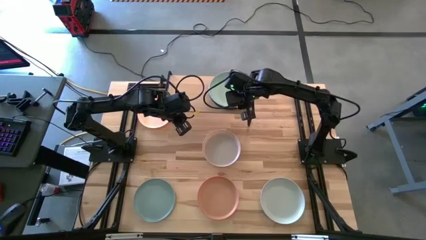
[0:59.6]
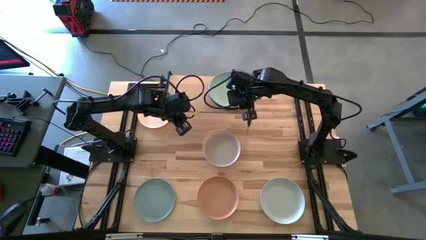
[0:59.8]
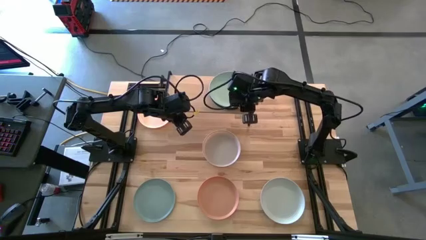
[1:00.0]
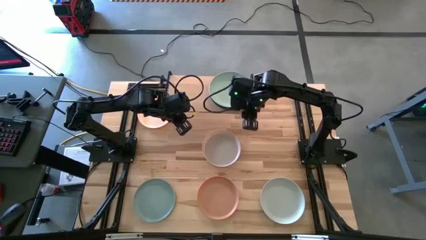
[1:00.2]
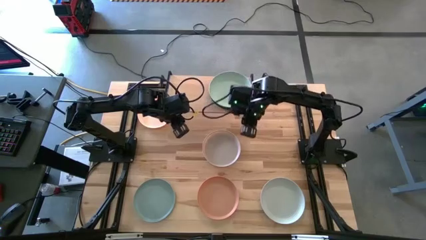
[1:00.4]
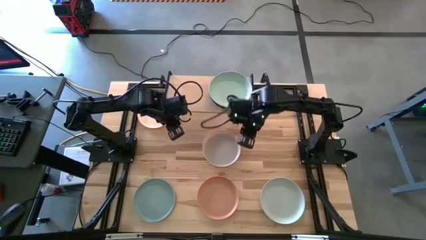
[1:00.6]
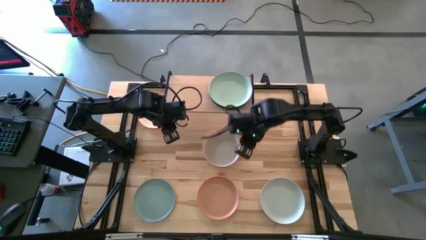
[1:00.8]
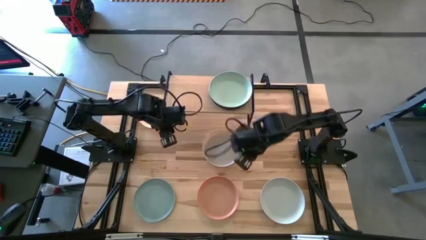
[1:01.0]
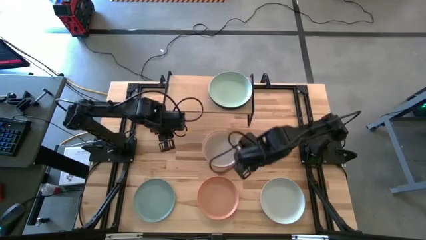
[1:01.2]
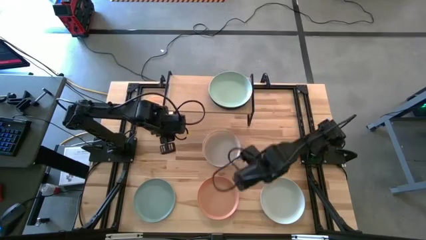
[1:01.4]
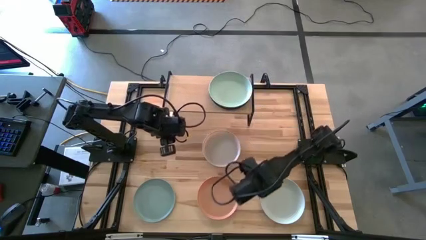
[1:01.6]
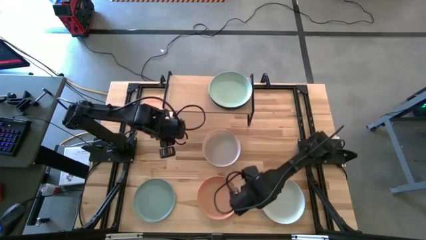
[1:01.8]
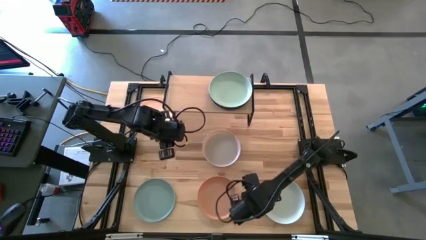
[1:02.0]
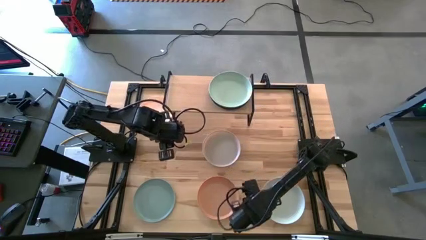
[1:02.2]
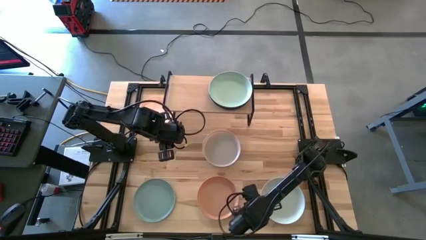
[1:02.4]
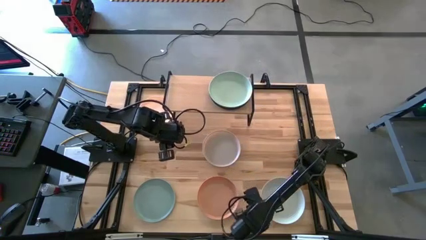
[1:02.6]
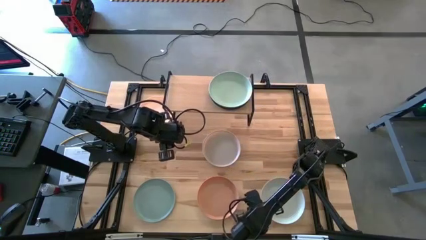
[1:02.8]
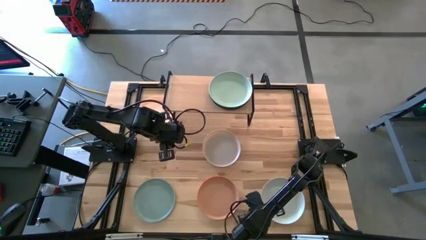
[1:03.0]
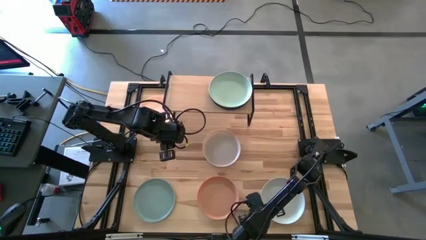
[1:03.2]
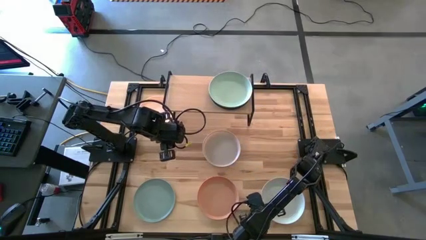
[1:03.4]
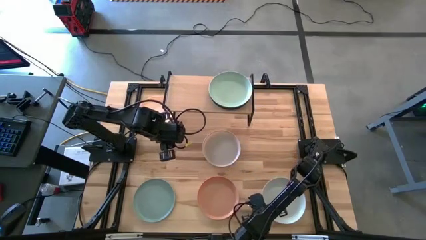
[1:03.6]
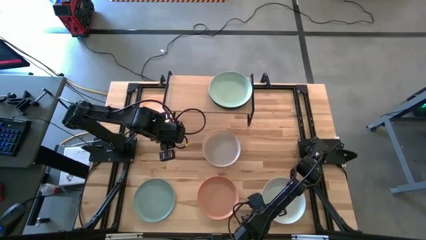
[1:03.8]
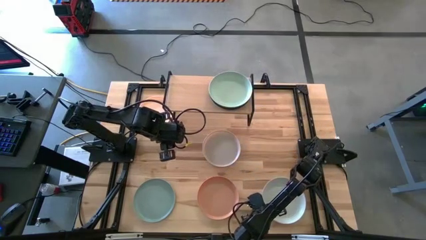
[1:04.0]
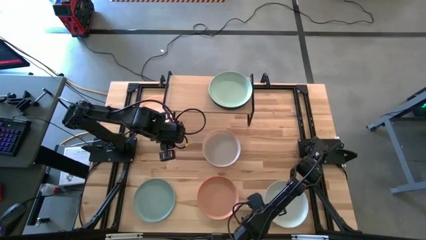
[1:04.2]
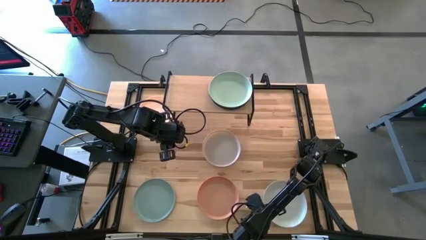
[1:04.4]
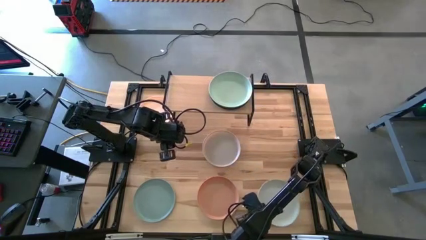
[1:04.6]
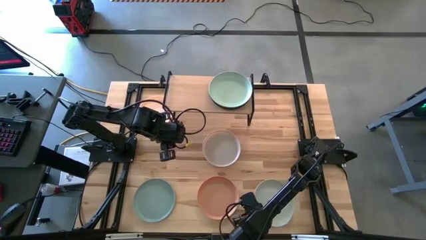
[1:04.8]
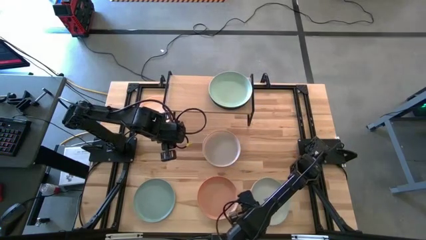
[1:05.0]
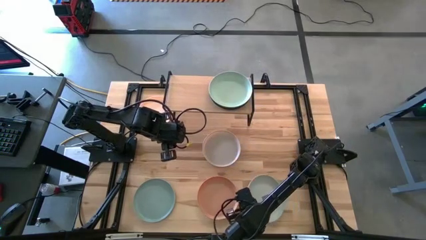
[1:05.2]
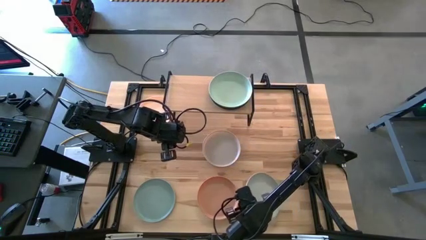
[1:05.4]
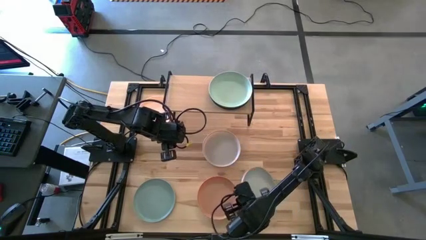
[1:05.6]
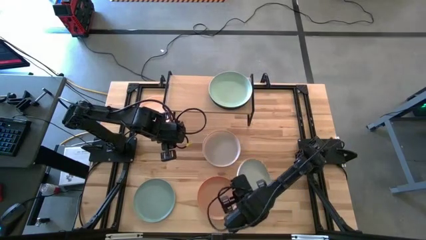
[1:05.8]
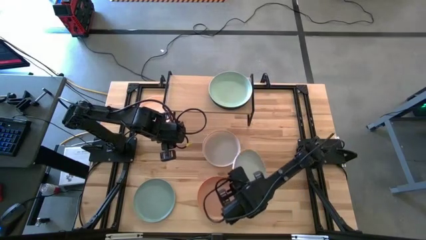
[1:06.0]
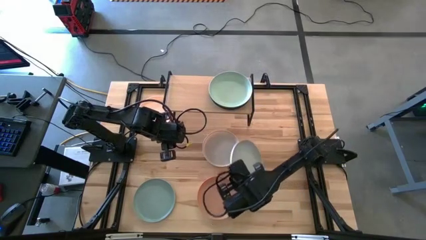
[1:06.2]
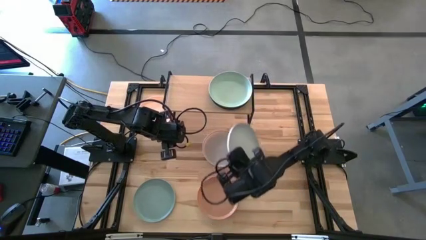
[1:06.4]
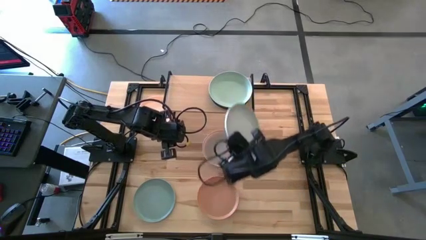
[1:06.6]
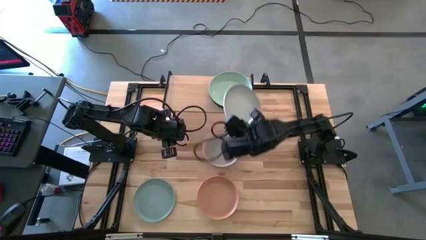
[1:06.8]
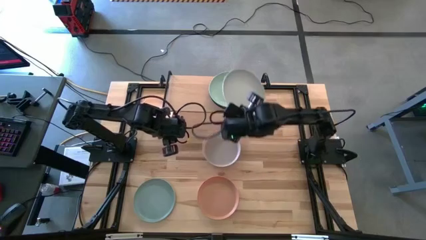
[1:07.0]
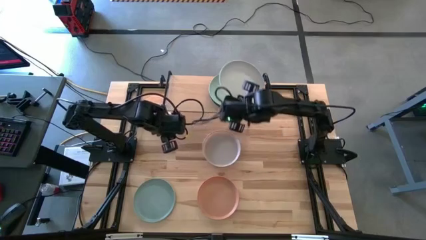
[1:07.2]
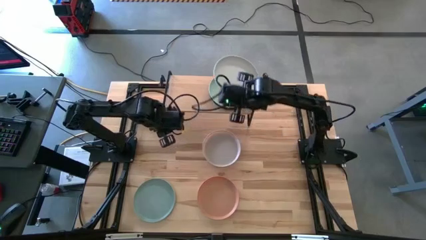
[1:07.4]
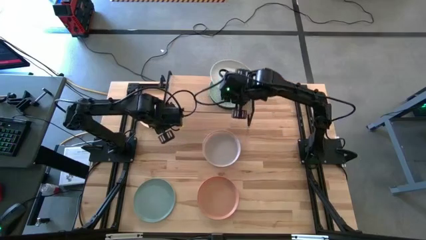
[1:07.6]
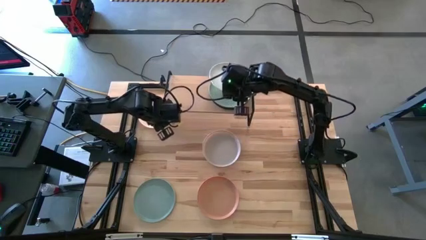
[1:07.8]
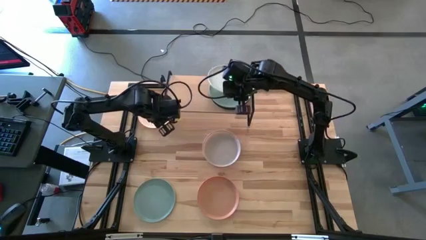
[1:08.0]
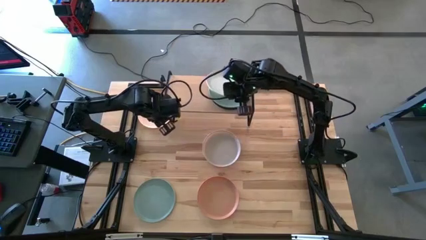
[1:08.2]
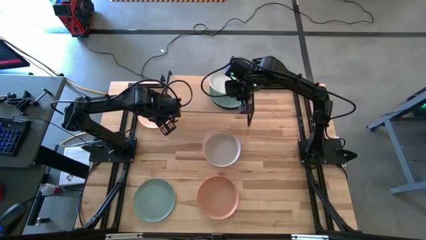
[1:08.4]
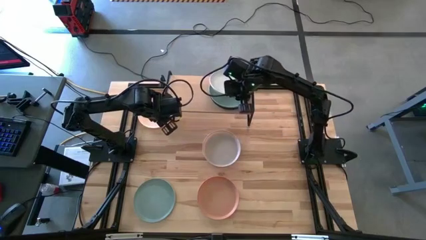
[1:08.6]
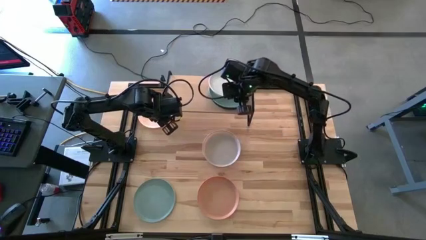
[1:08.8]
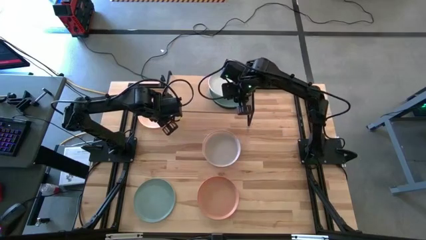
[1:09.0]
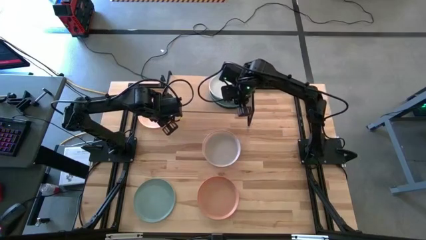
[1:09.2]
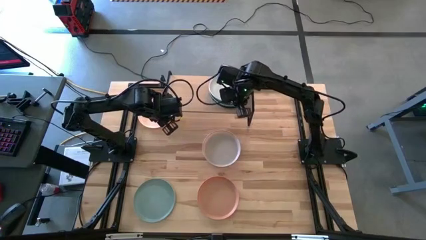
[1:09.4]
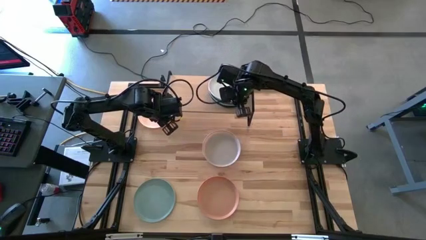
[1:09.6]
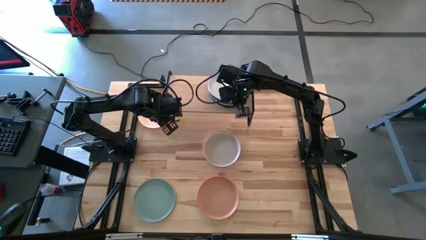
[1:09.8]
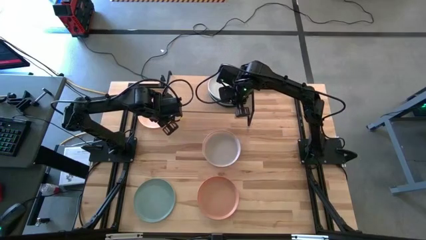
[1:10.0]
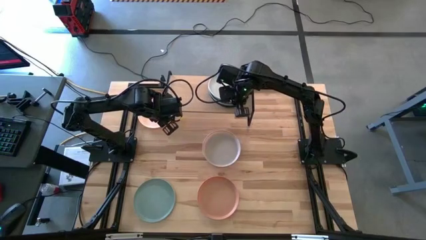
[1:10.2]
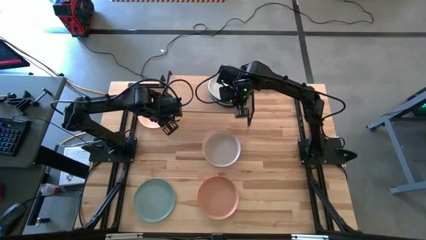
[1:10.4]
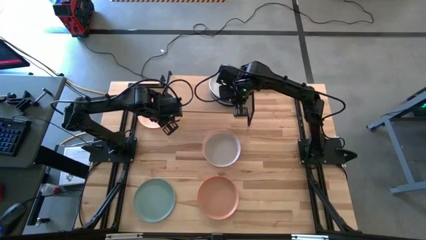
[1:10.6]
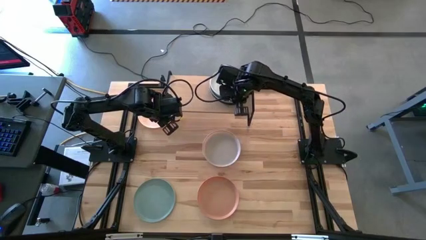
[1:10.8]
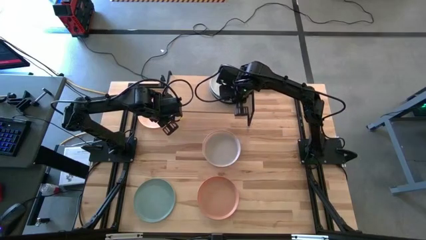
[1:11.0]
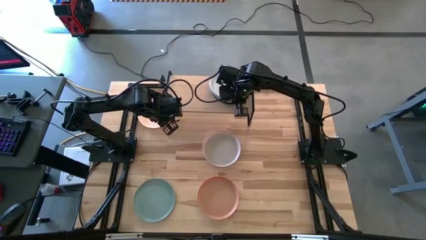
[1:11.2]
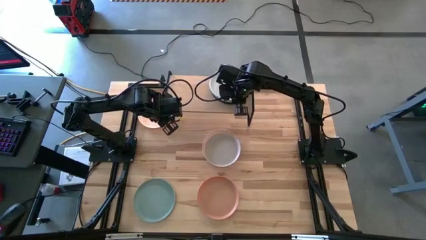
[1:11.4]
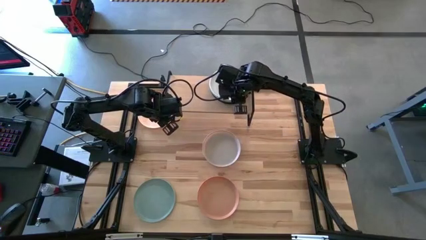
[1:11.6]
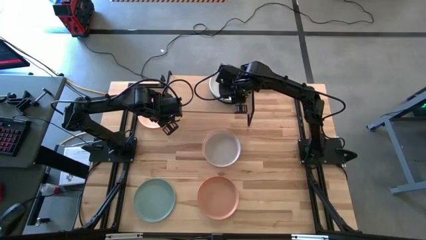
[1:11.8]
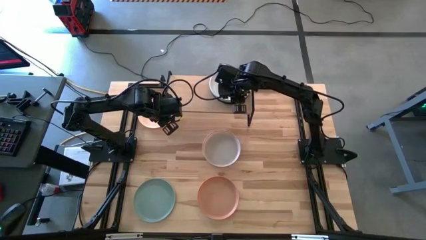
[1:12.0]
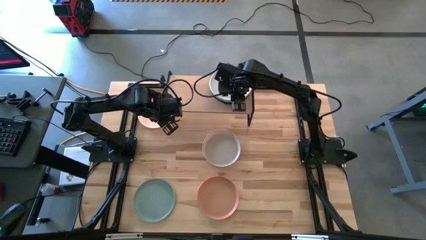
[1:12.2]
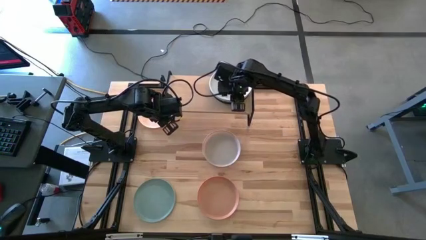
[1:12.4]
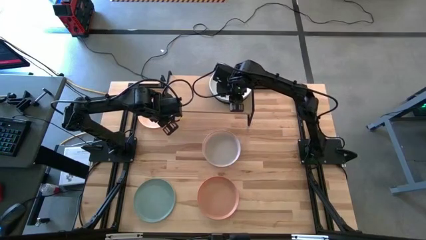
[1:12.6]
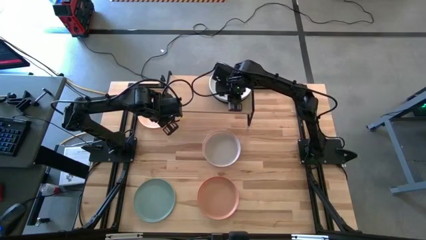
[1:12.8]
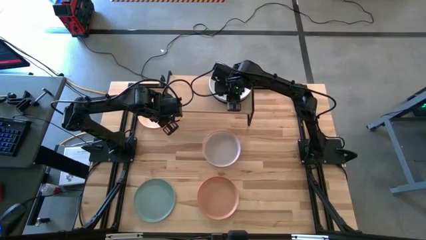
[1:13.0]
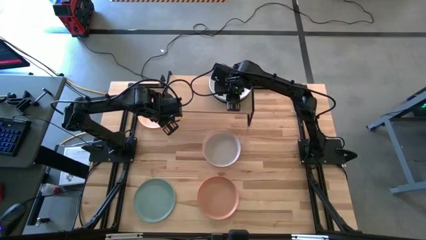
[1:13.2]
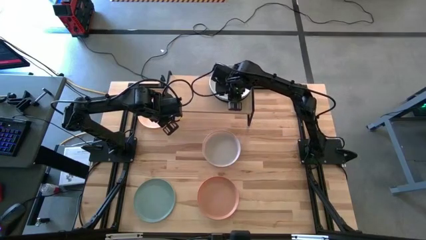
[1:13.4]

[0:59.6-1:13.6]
Task: Place and stack plates onto a shelf
Stack the white plate on top of the green plate
